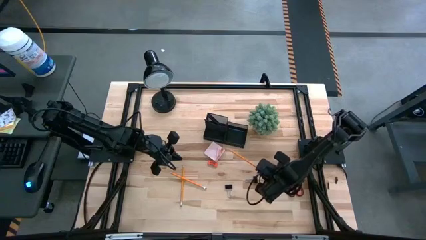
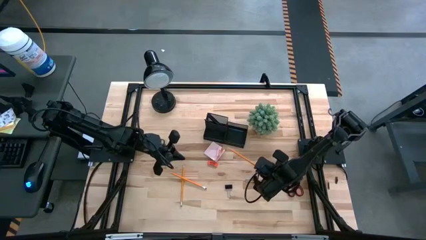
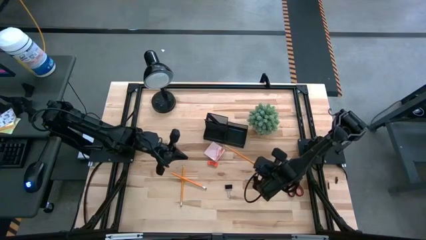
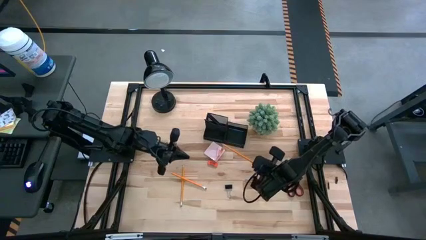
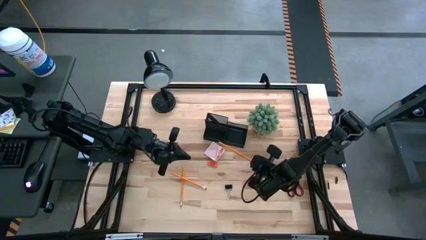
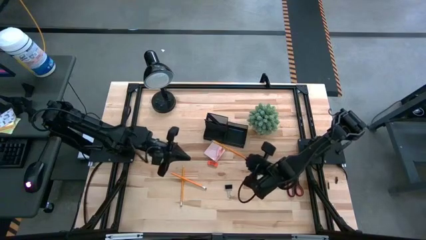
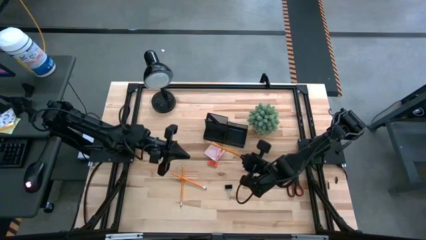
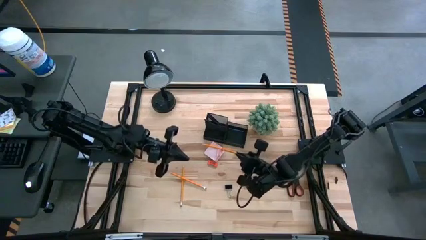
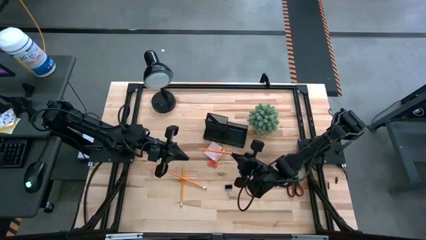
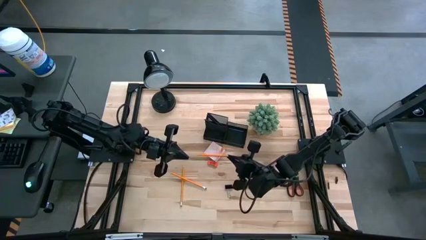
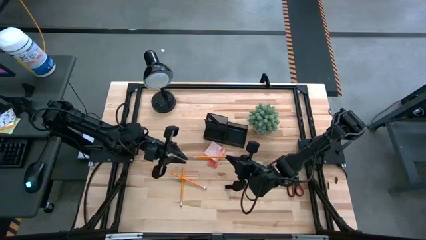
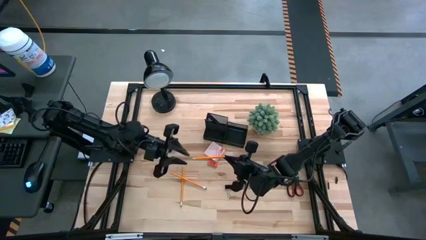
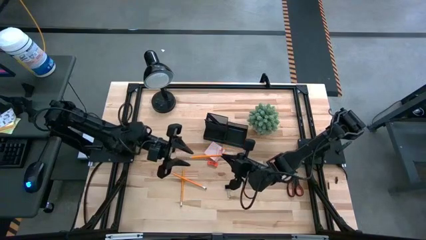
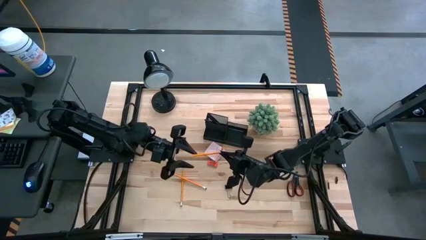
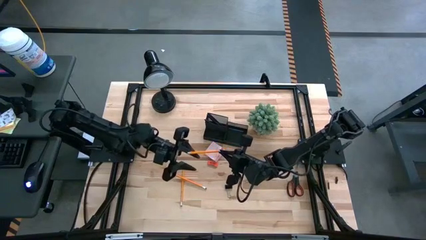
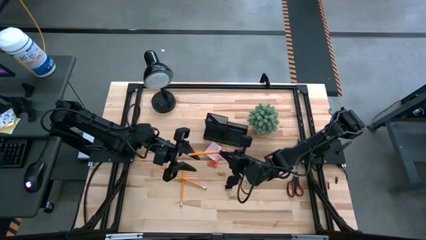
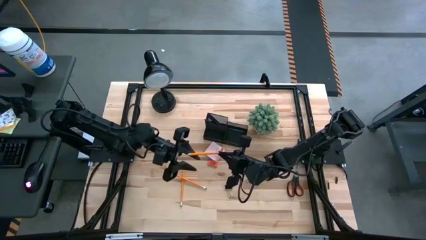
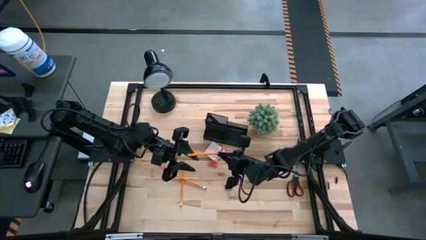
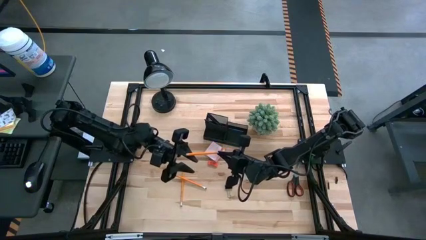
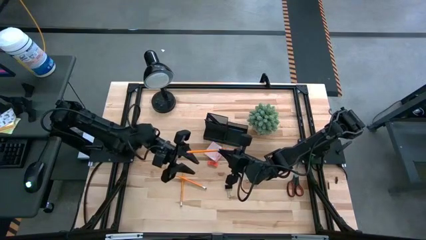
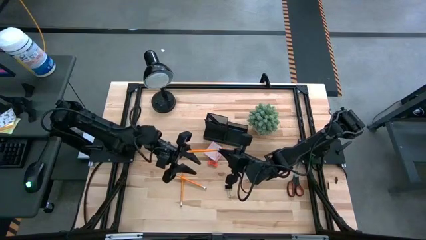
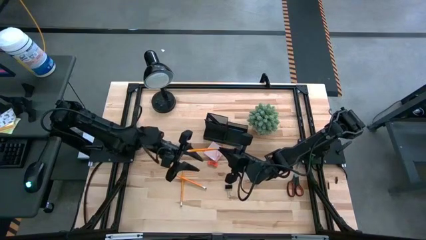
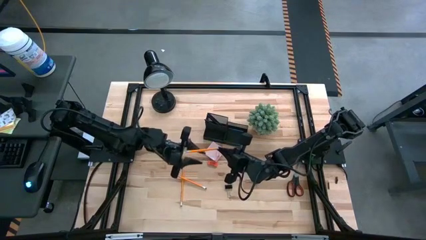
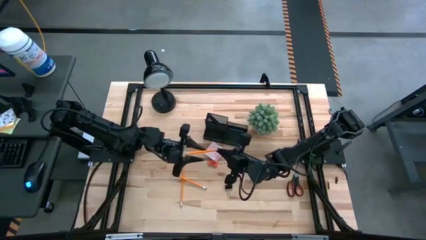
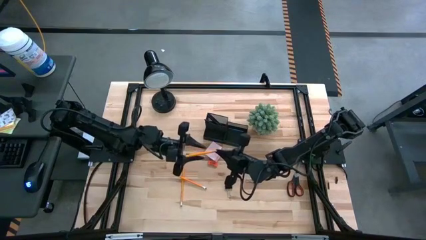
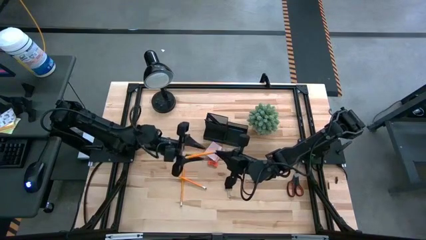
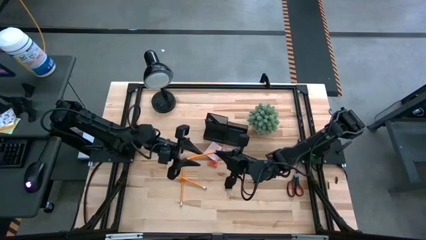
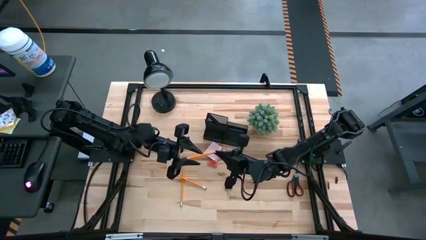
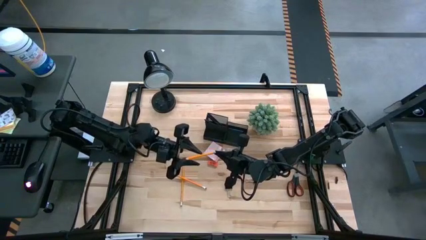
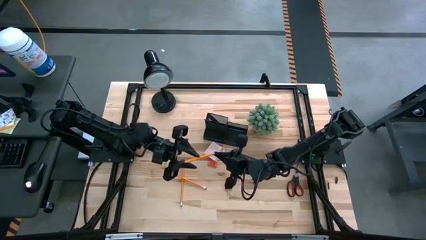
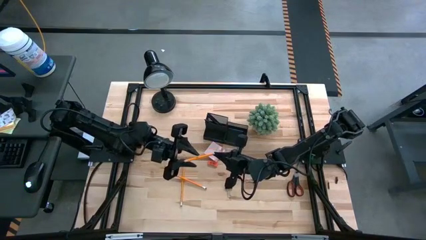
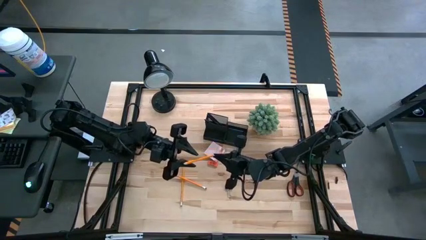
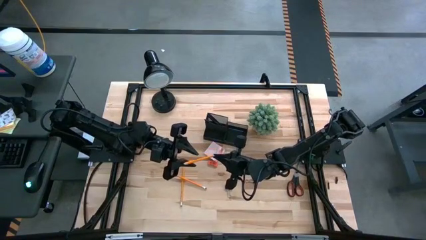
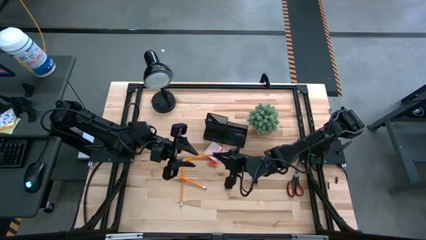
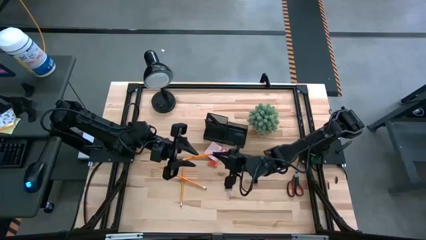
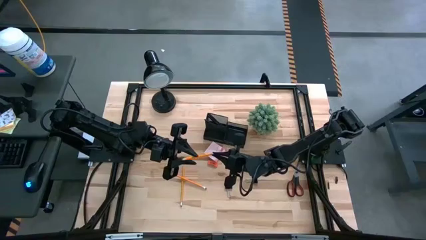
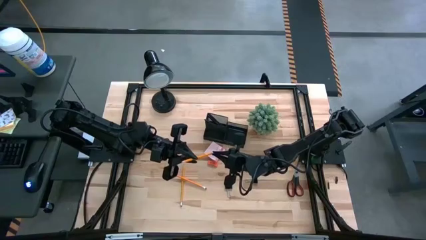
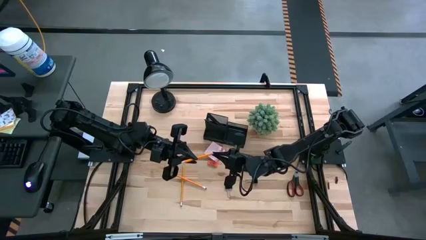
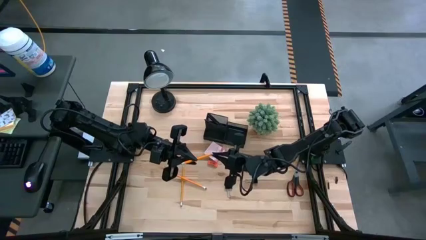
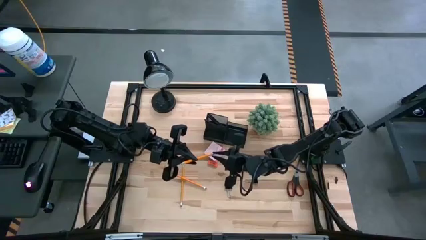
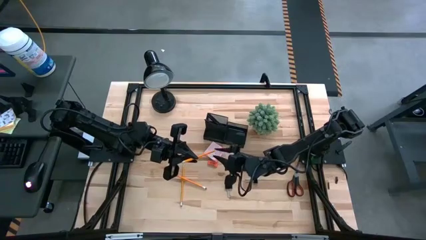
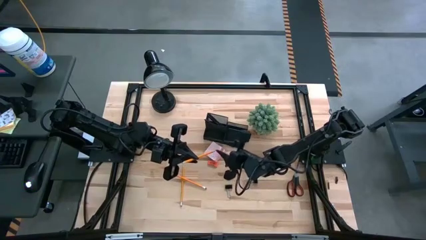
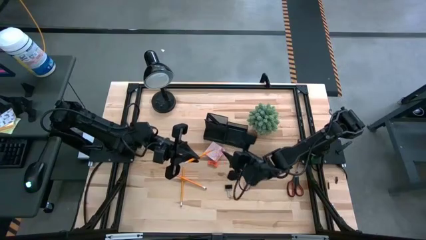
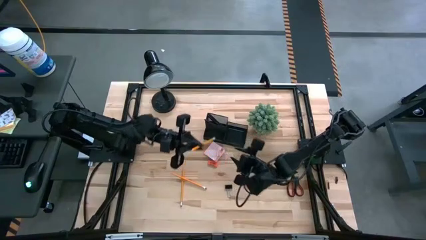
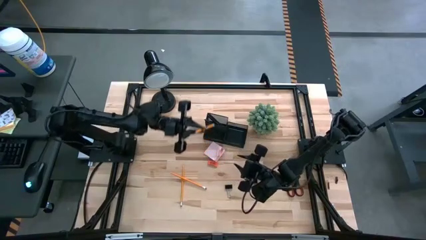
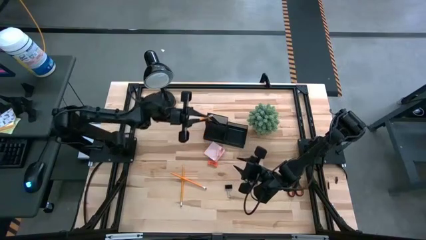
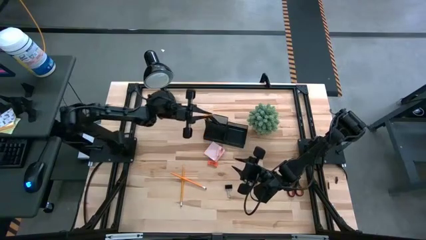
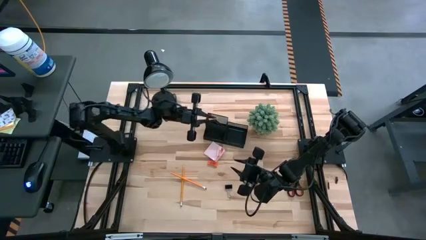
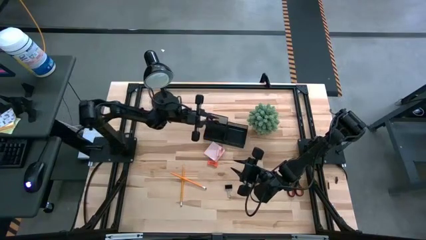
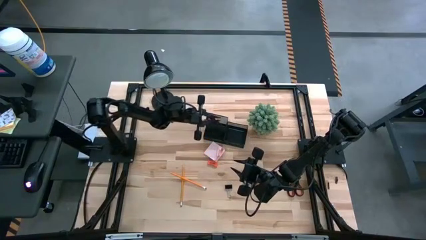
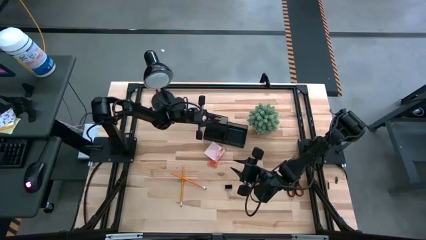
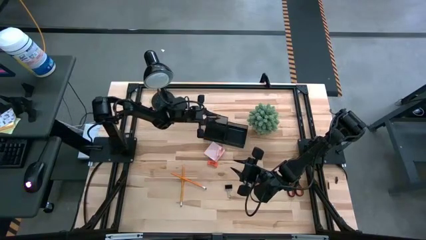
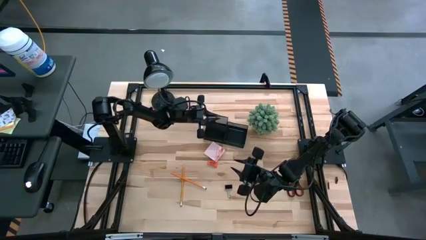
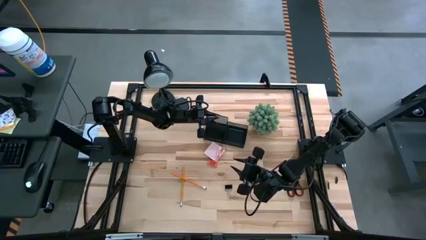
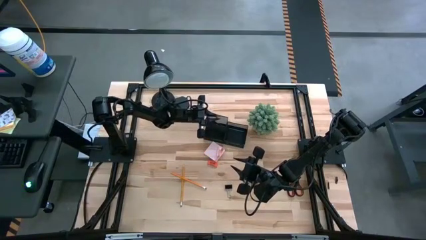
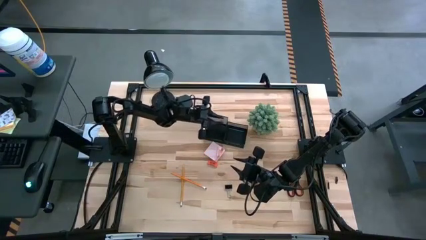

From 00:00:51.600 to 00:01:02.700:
Task: Pick and place office supplies into organizer
Put the right orange pencil into the black desk organizer

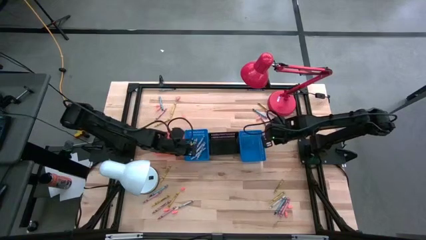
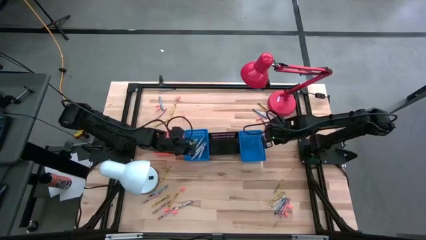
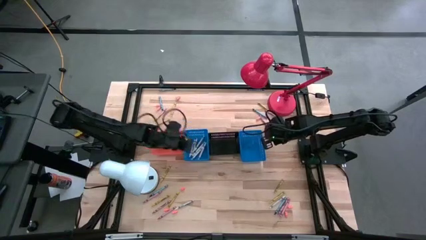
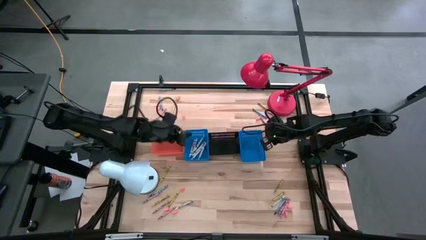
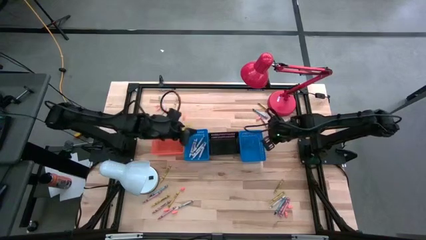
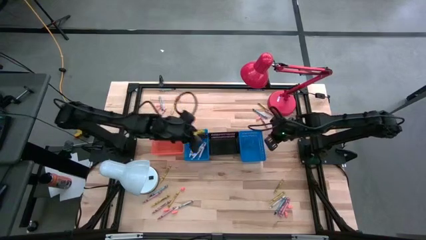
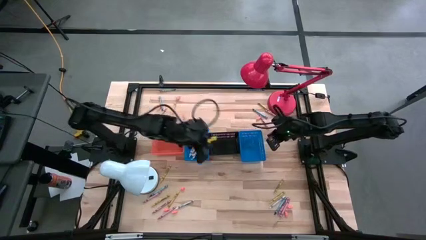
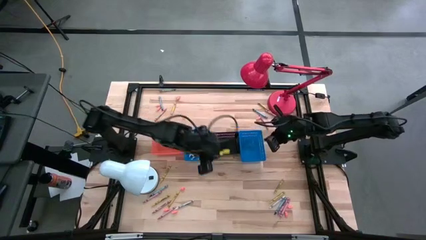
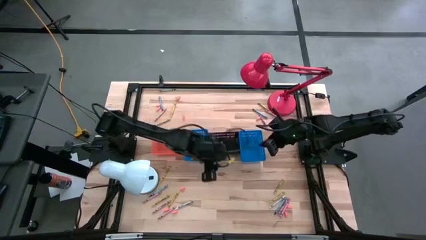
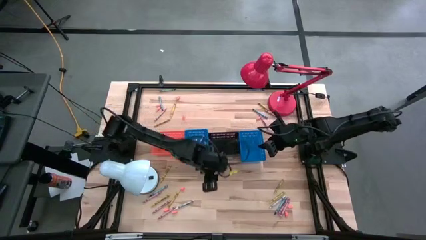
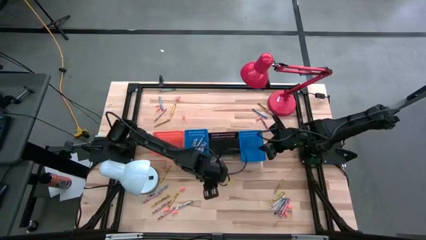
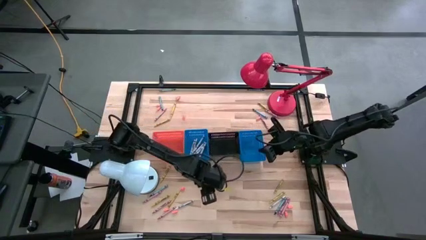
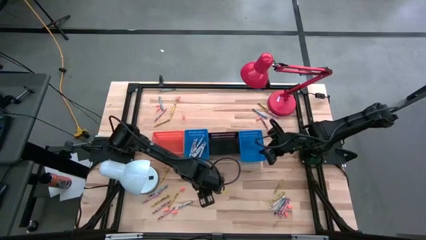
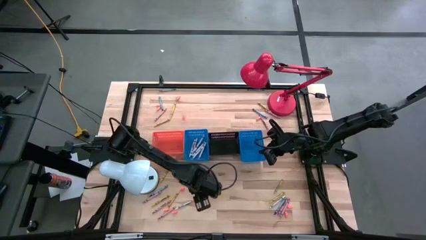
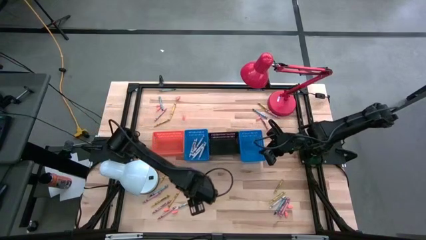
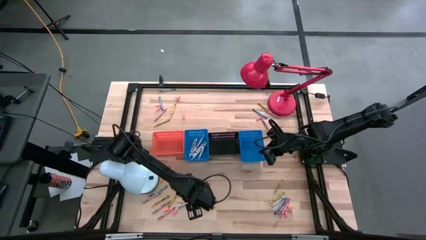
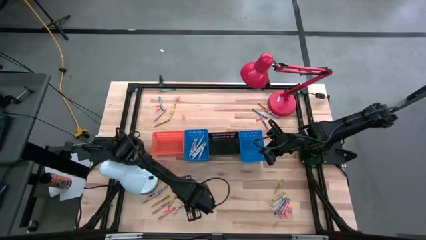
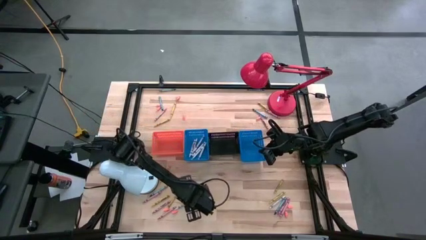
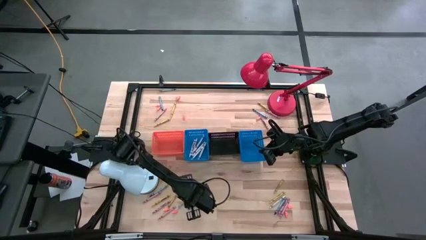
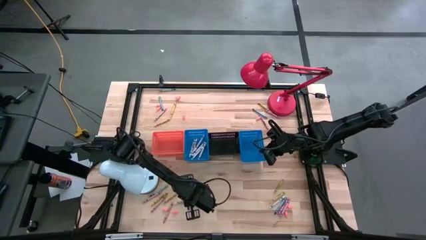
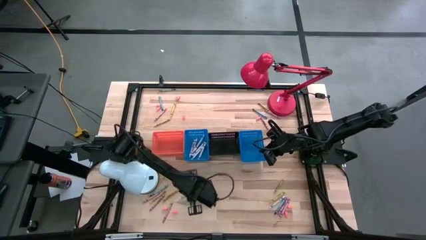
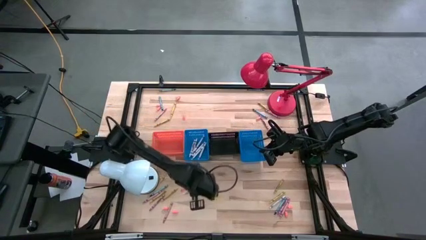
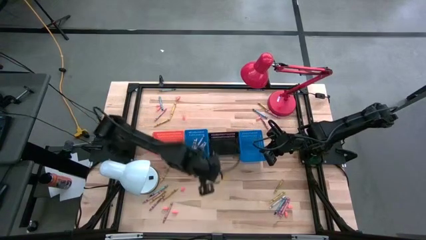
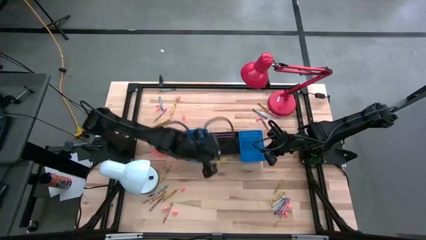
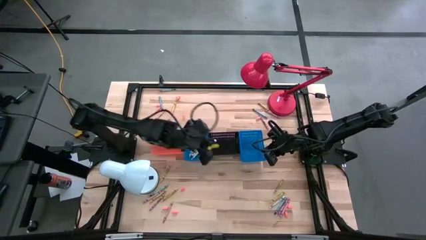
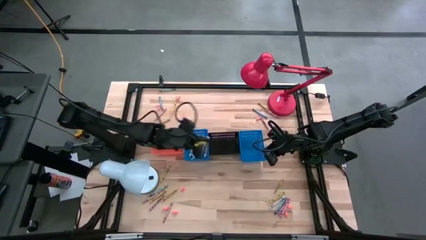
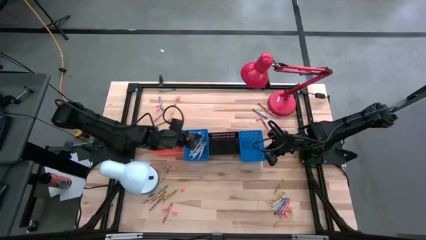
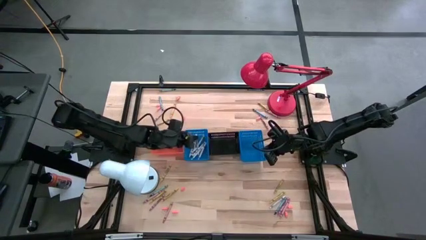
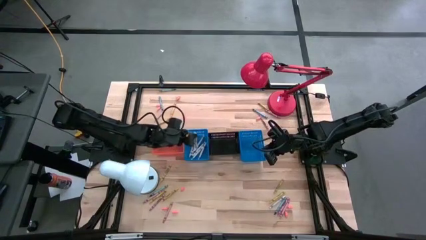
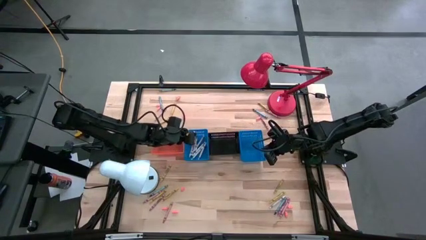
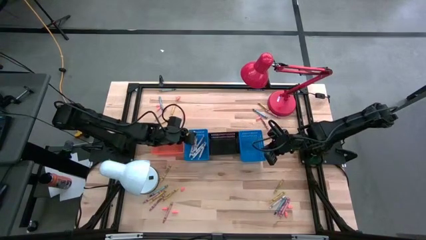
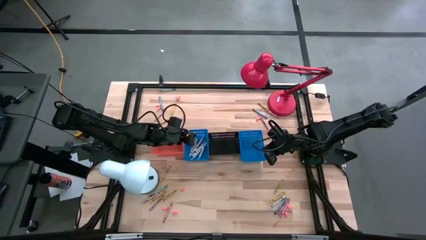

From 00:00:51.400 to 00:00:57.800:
Task: Sort crayons
Put the left white crayon into the left blue bin
